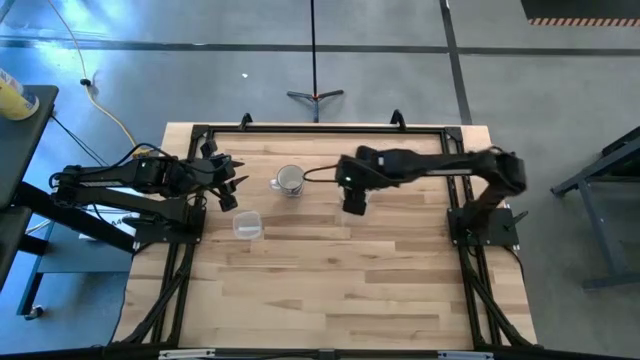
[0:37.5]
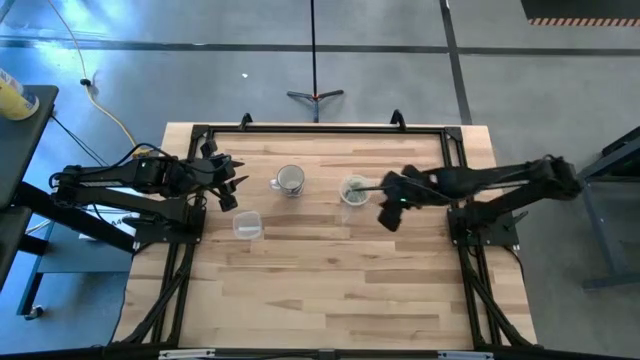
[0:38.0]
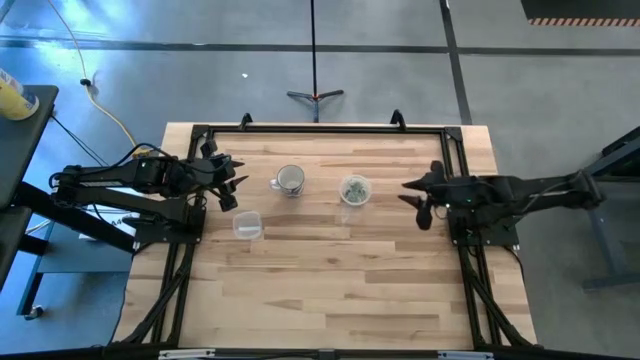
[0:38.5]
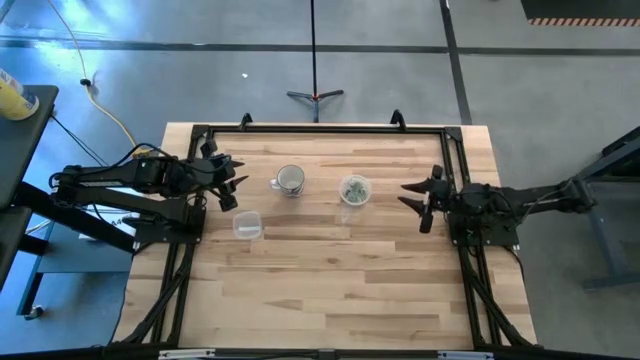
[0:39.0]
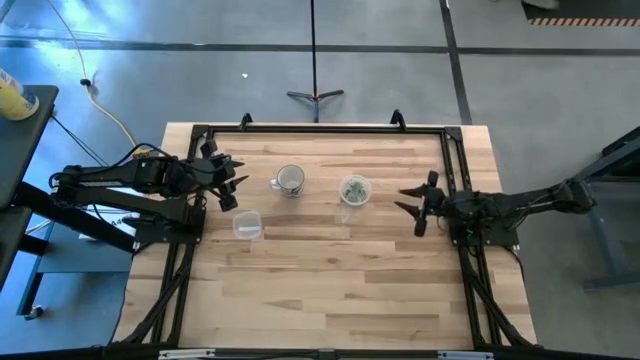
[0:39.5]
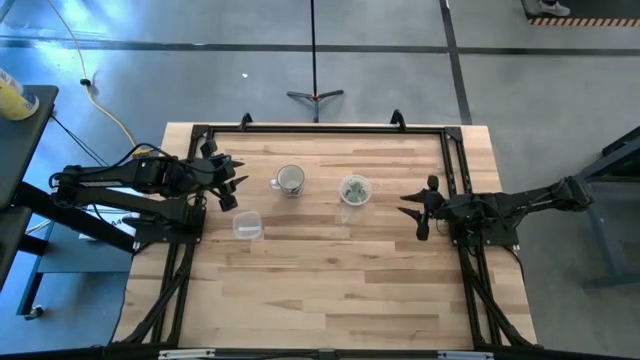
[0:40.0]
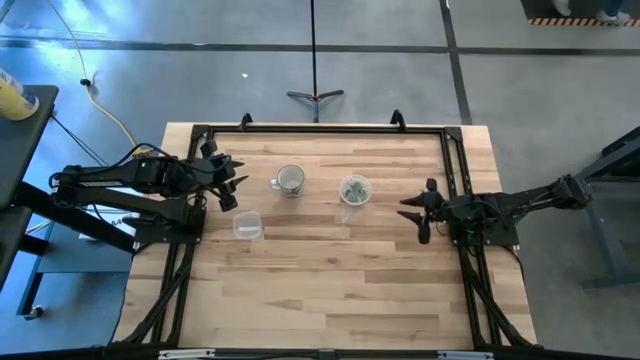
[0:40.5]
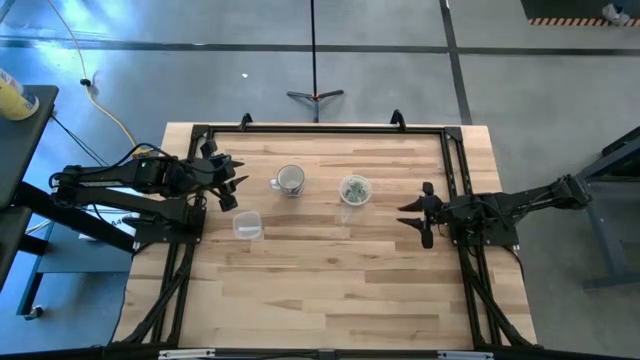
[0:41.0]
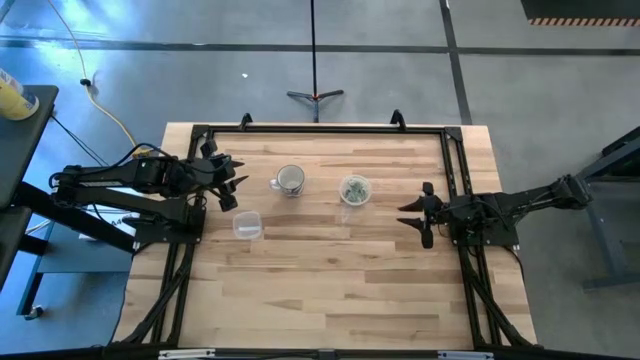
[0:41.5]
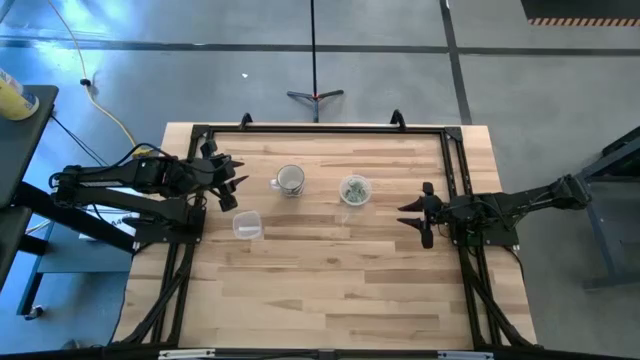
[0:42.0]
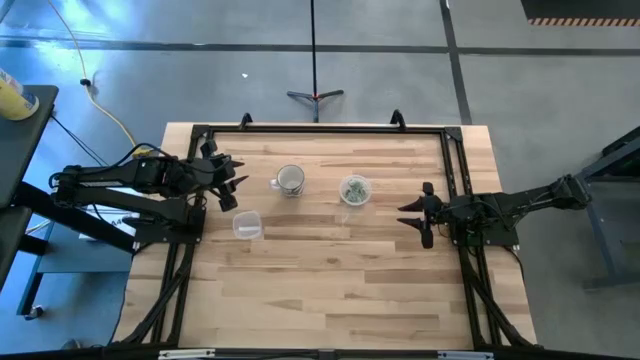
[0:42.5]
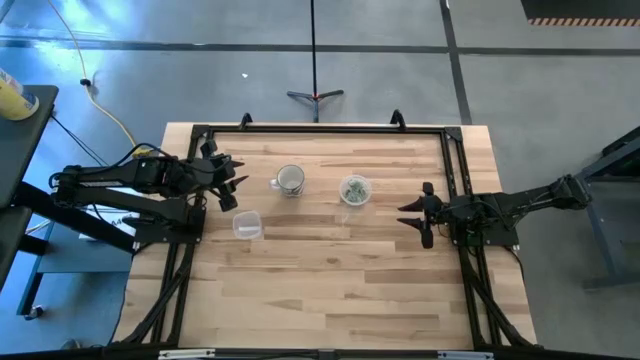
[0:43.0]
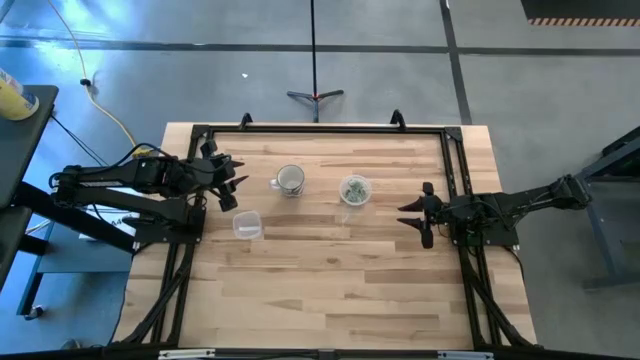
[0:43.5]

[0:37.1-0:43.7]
Task: Pick and place Stevia / Truvia into bins
Return to Home Position

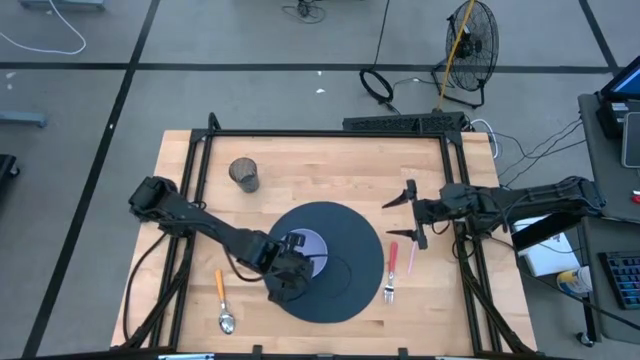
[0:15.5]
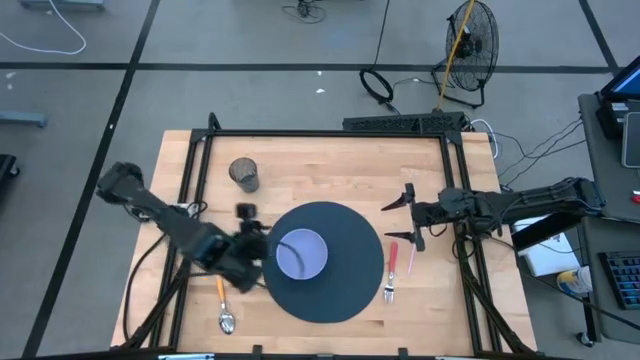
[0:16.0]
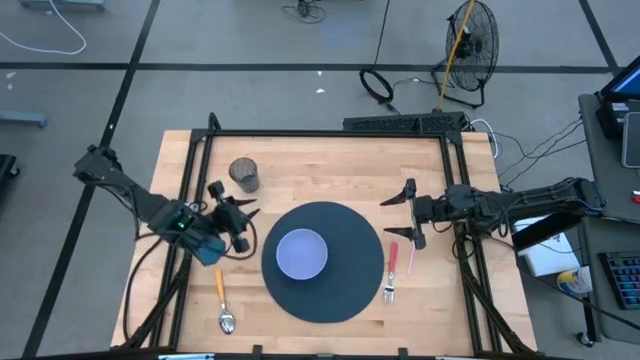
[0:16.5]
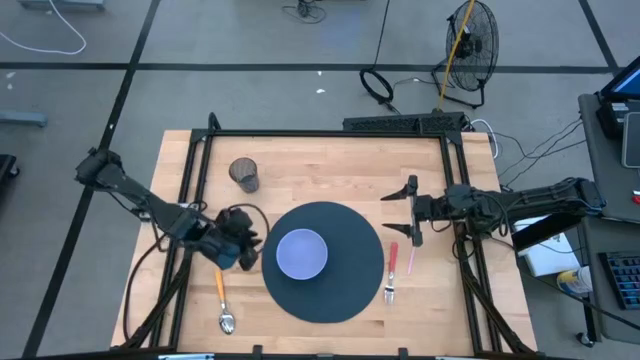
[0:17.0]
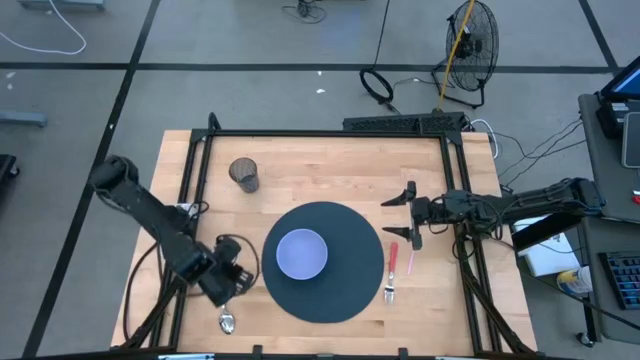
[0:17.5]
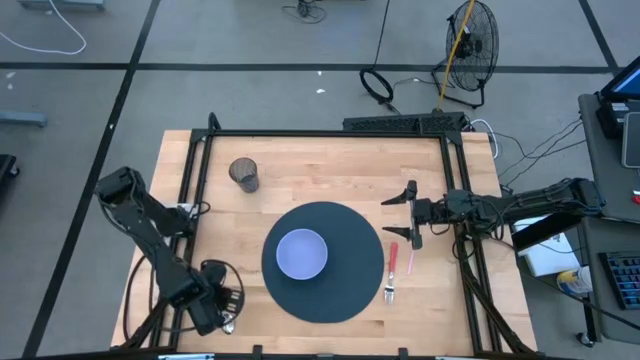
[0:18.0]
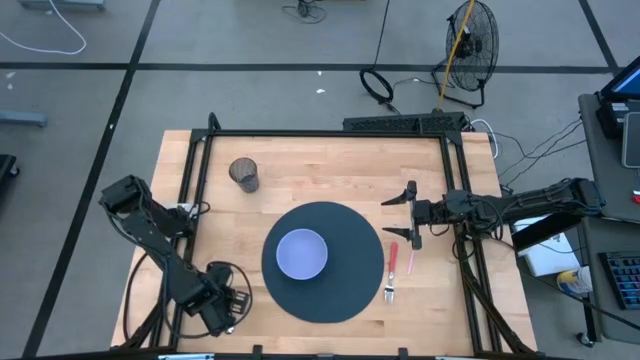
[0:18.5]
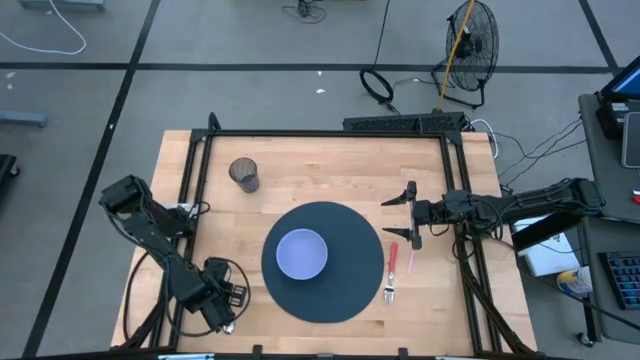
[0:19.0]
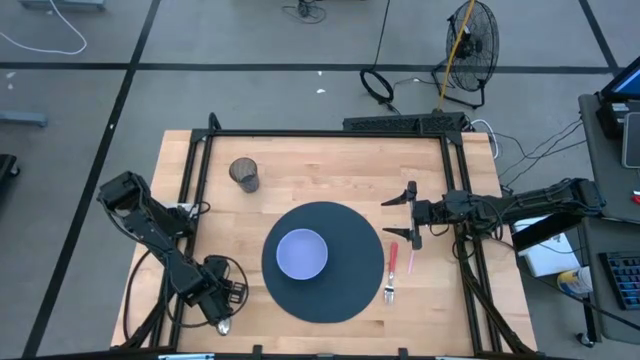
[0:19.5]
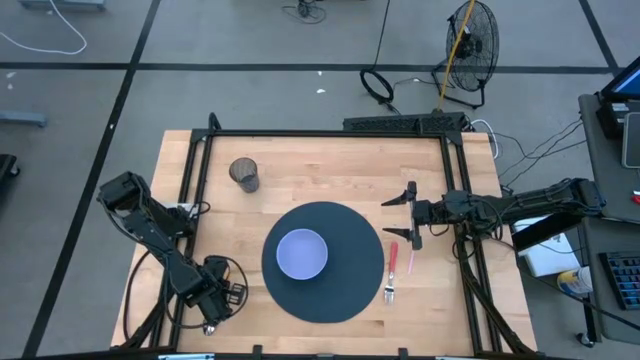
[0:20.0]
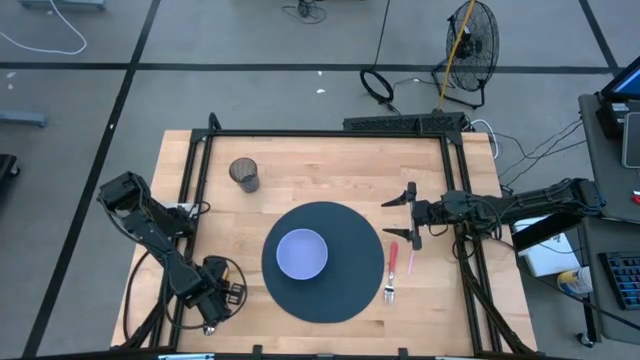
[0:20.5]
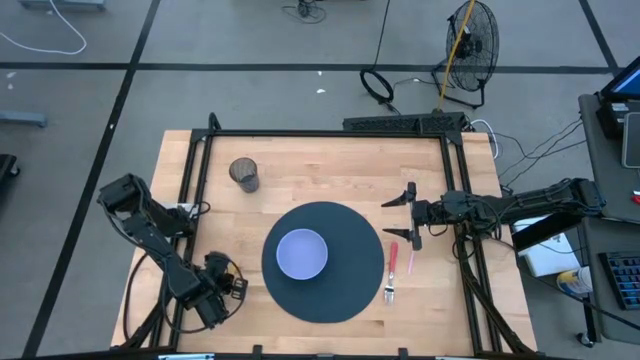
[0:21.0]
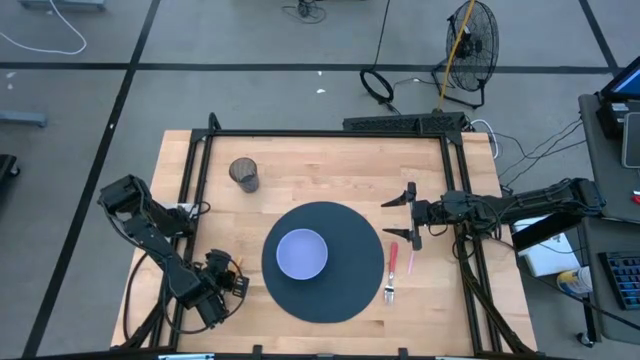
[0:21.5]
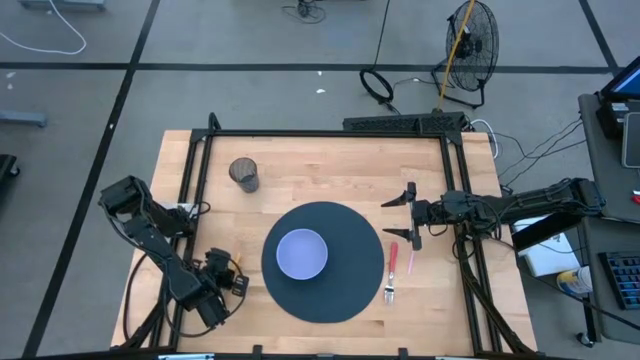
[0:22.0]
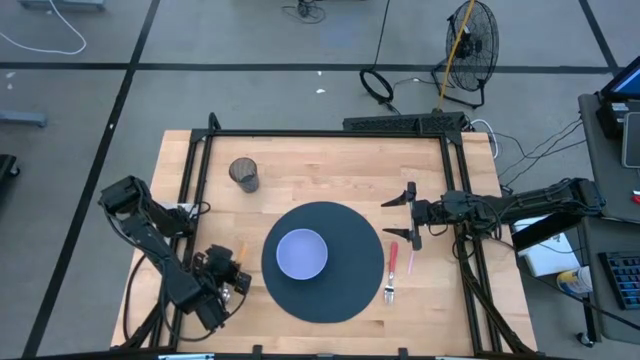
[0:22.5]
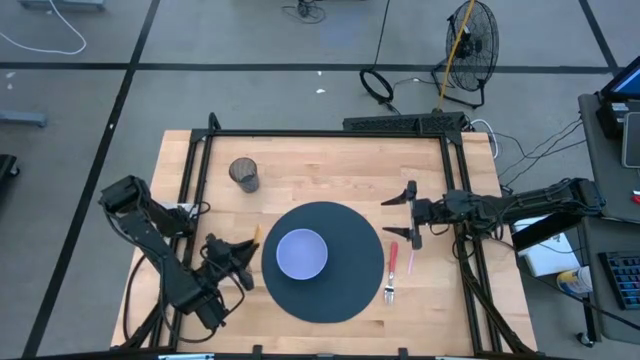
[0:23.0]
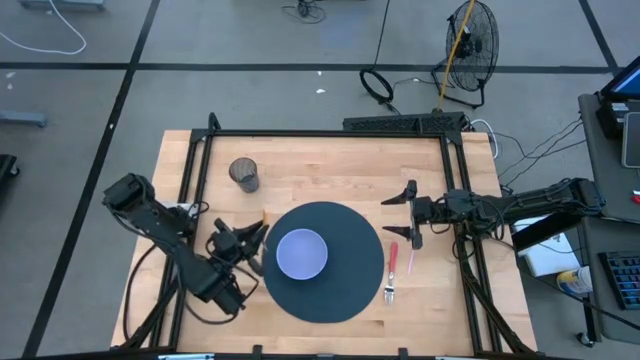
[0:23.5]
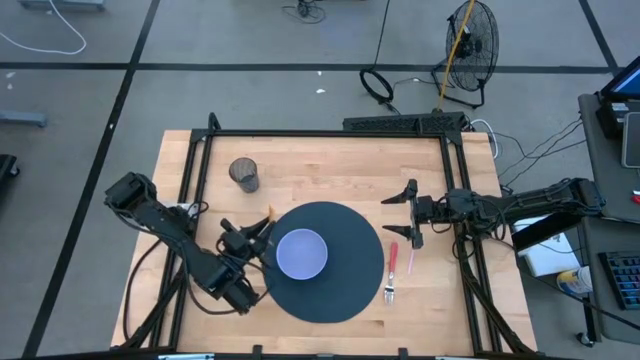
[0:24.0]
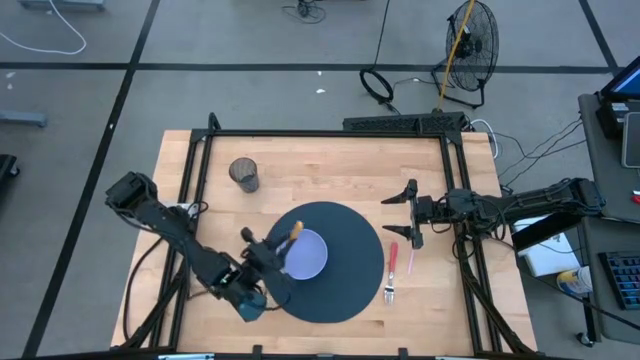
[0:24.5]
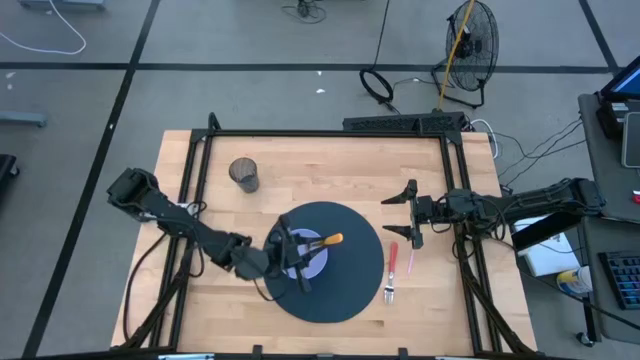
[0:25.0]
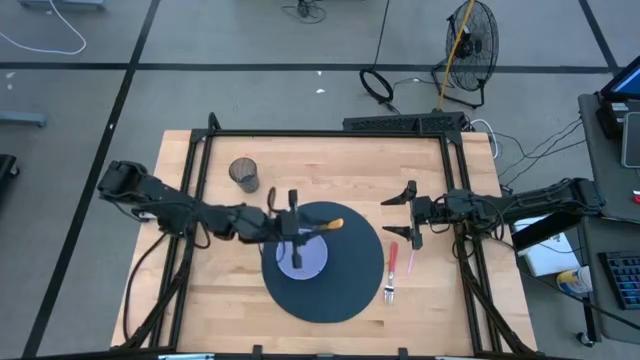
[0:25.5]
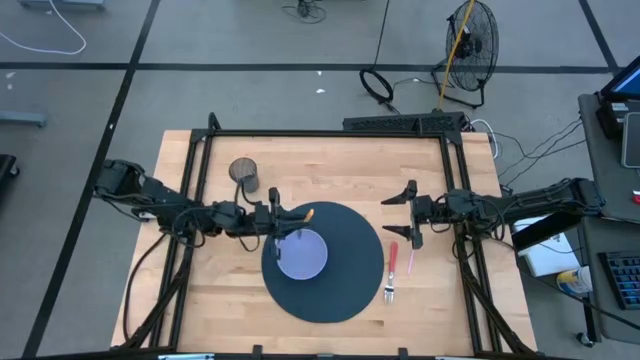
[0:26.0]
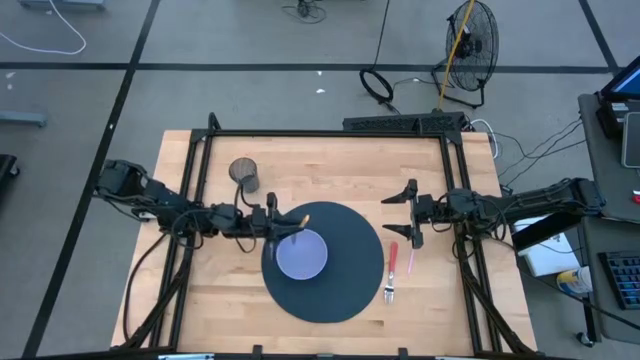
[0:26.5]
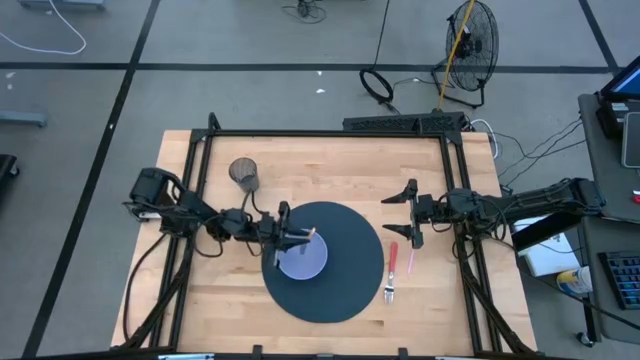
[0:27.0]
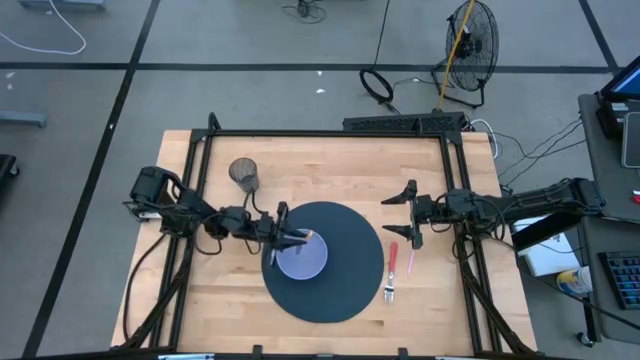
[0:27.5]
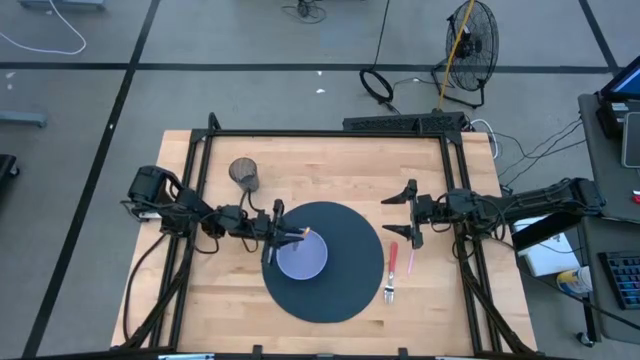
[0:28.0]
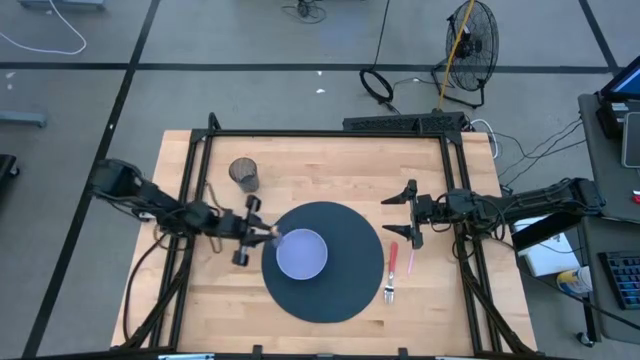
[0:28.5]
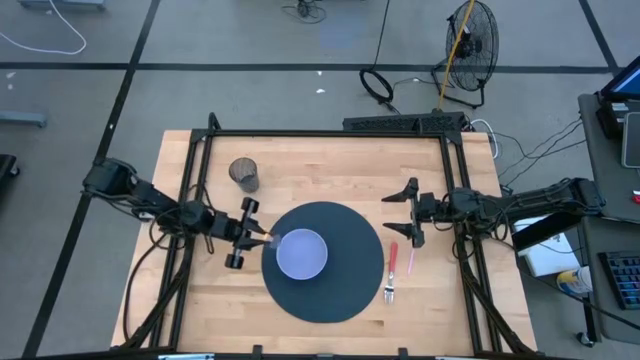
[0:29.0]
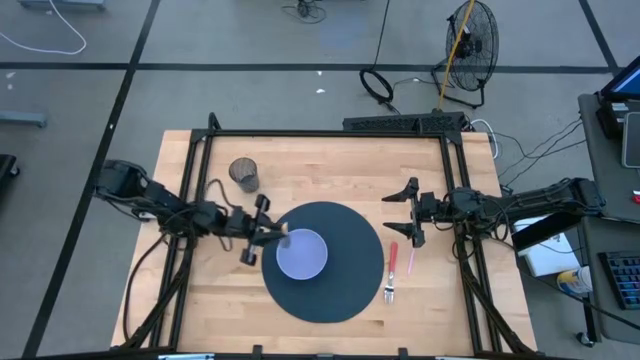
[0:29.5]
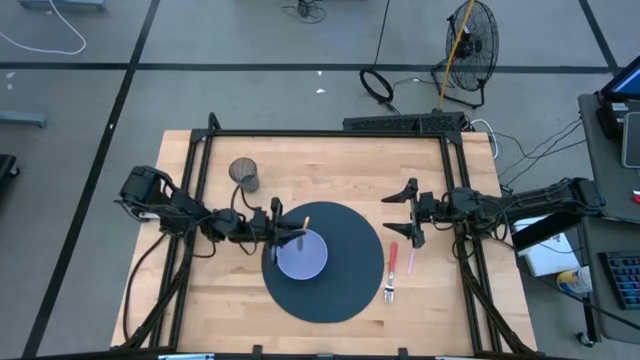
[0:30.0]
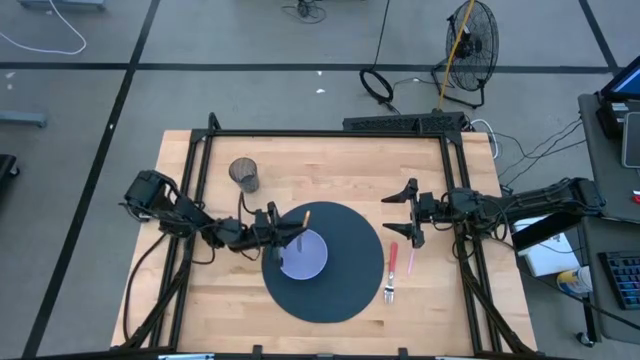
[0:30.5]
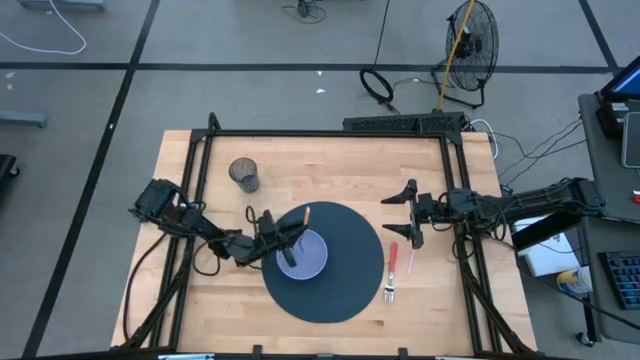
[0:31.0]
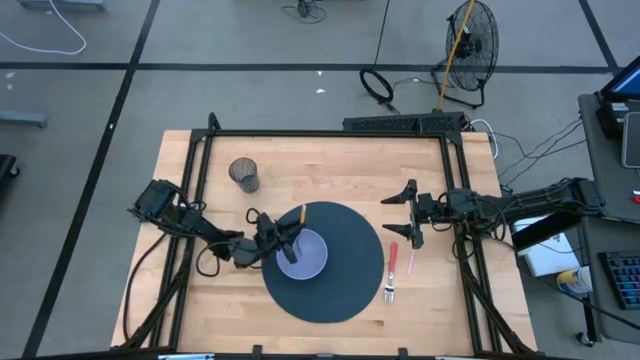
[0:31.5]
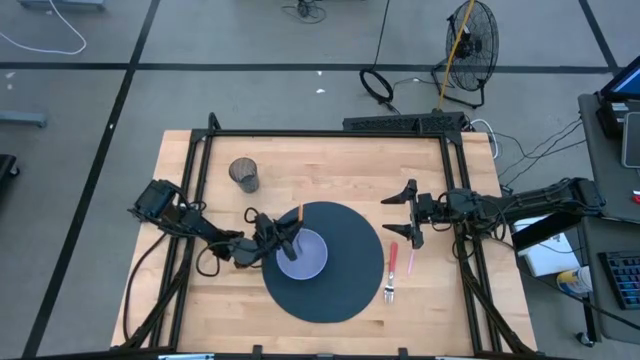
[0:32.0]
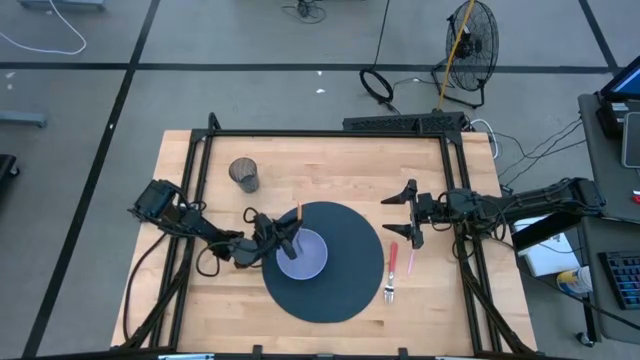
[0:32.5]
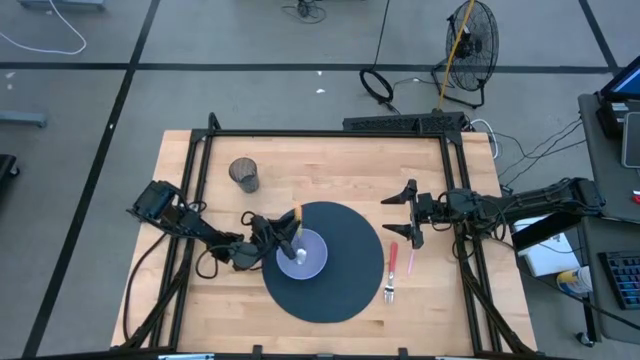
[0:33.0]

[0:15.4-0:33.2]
Task: Pick & Place Utensil
Put the orange spoon into the purple bowl
